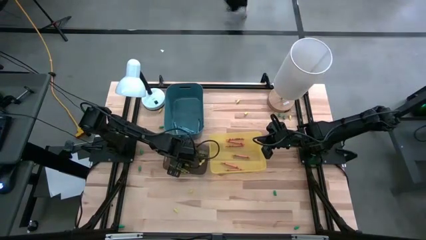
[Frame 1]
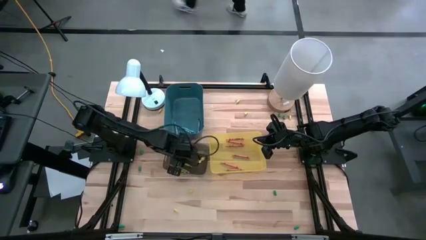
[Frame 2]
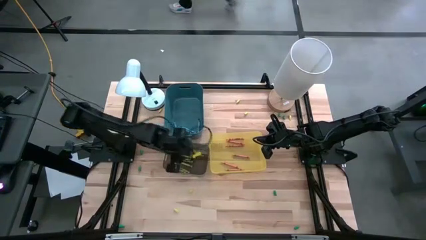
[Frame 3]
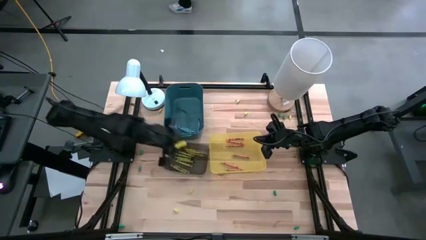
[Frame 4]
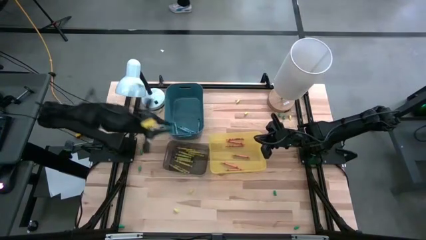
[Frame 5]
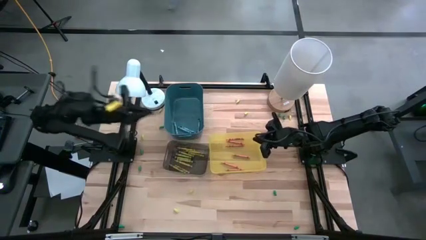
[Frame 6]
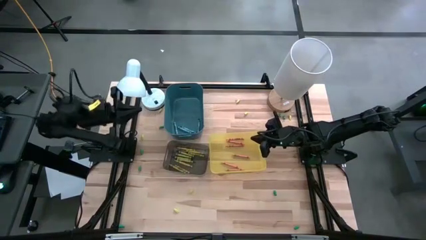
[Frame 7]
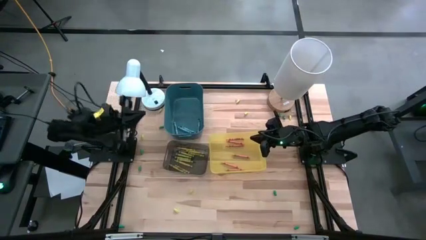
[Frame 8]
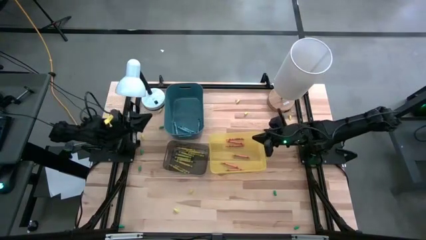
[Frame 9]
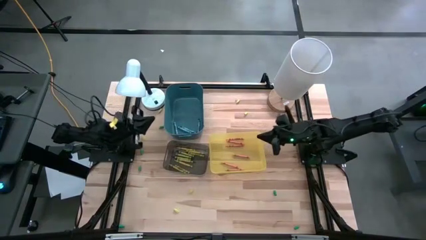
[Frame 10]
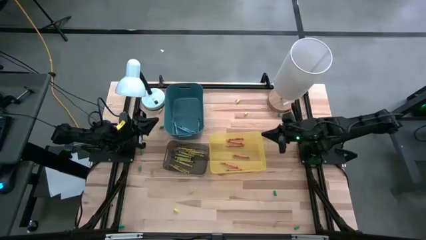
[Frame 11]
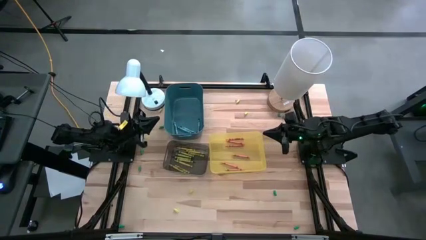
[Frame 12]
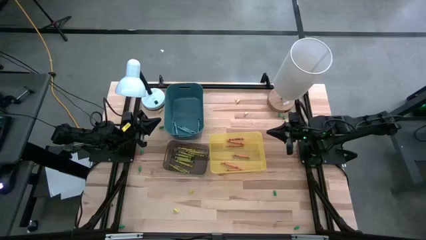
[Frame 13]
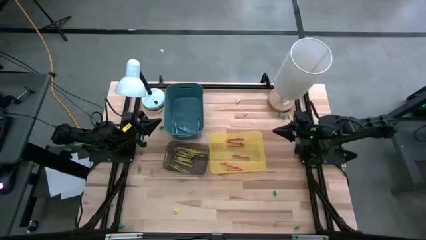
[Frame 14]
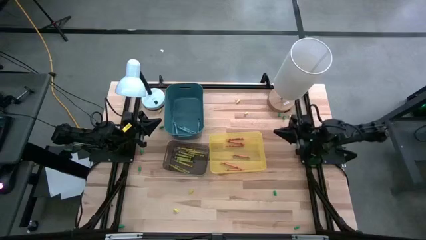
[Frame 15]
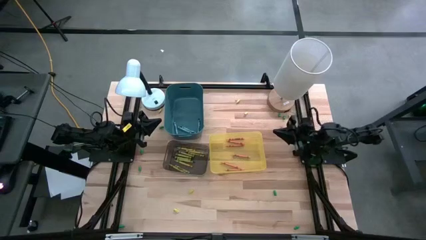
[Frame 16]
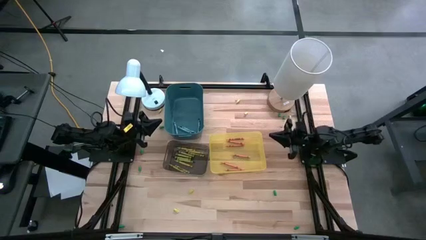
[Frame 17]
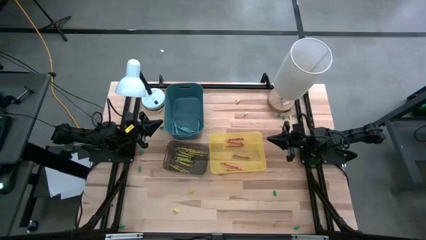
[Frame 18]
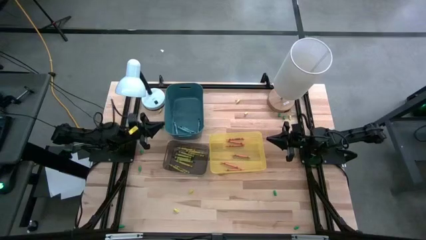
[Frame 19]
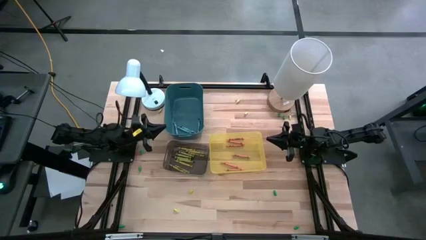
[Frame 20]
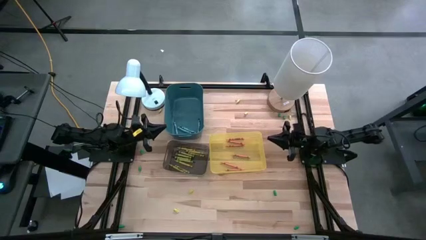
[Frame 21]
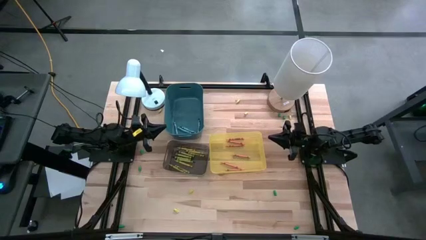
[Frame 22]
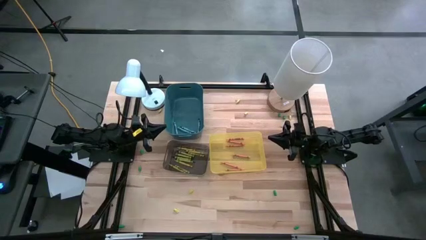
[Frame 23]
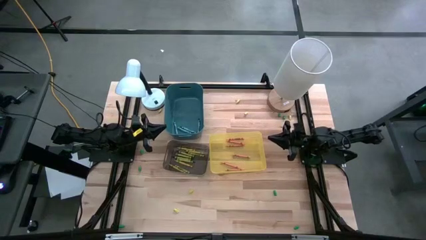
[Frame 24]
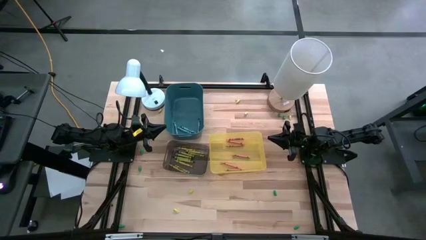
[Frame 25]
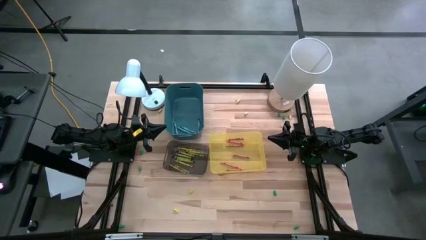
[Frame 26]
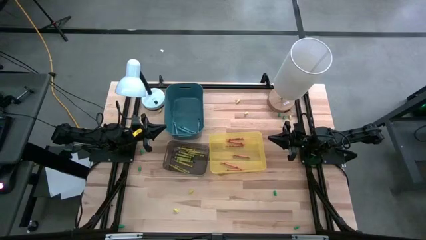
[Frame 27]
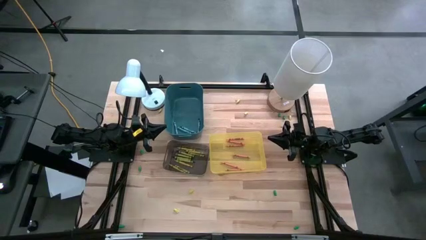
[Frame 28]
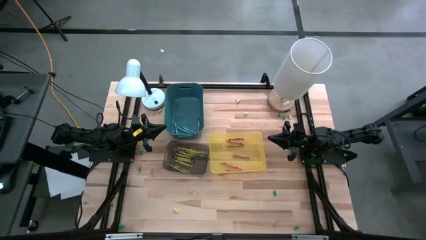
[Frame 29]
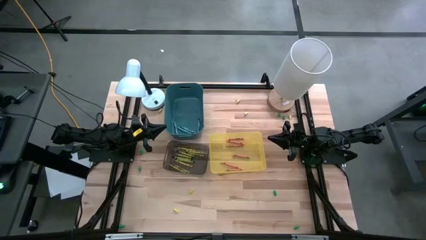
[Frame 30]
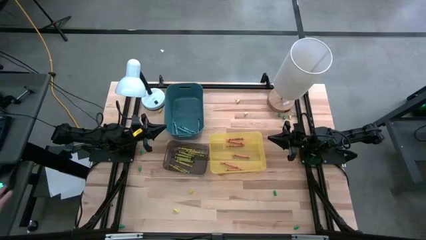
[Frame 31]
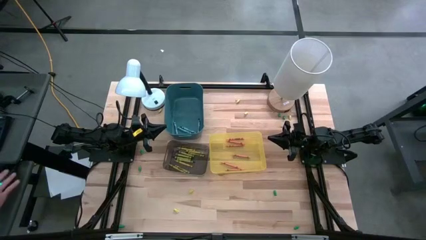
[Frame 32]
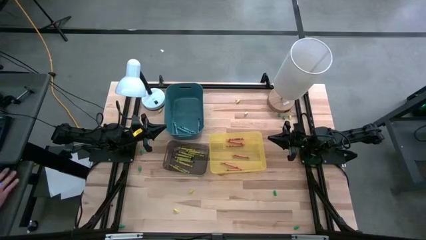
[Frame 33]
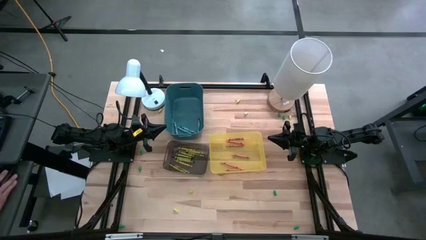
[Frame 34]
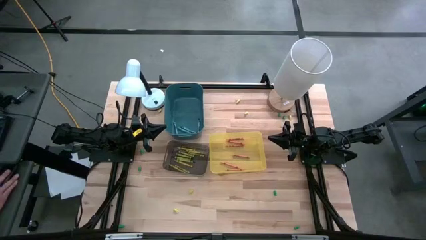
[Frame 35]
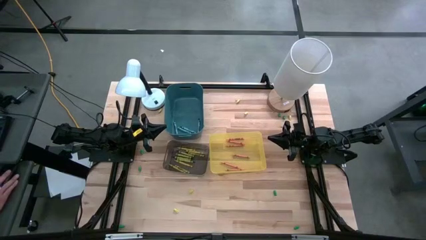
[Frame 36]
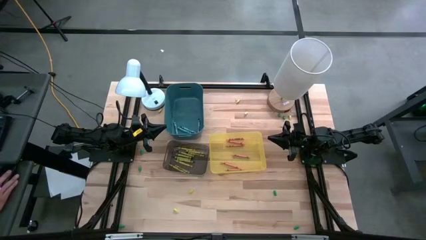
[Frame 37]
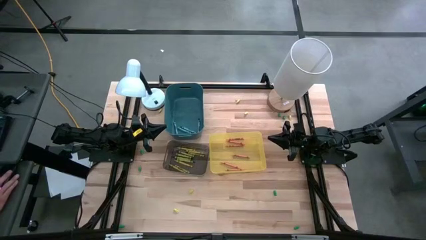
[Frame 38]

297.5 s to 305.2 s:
Task: Sort crayons
Return to Home Position

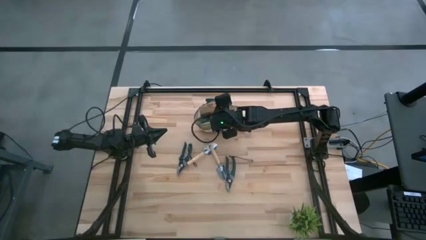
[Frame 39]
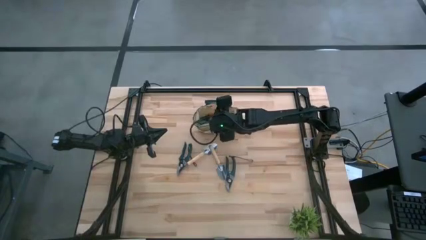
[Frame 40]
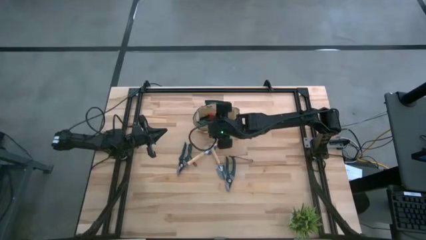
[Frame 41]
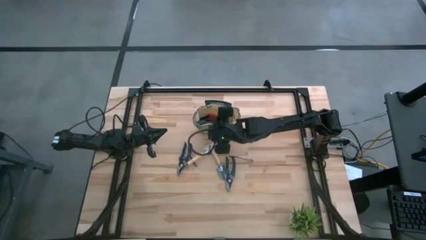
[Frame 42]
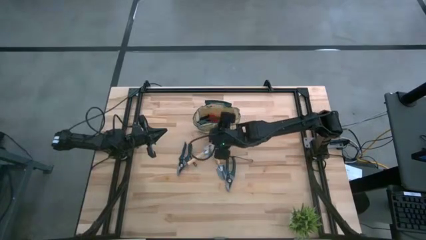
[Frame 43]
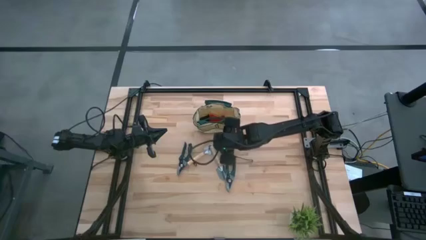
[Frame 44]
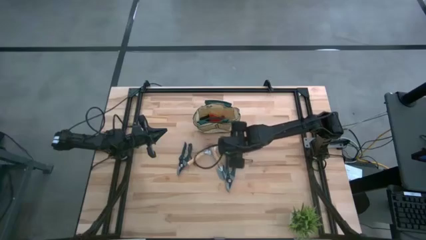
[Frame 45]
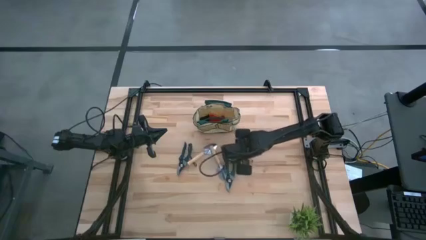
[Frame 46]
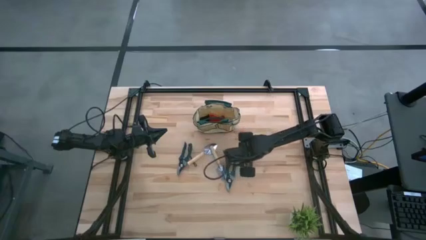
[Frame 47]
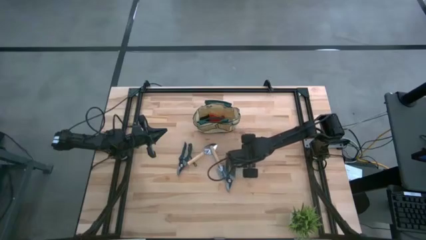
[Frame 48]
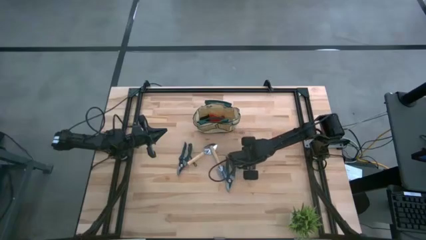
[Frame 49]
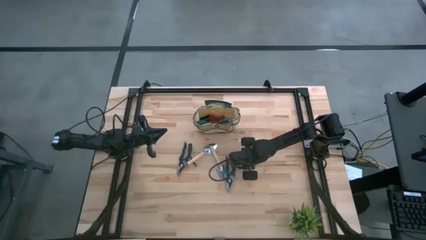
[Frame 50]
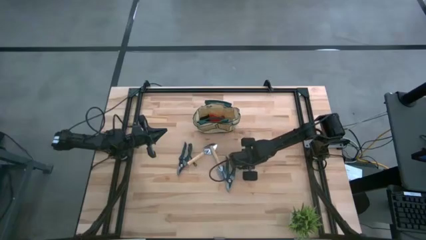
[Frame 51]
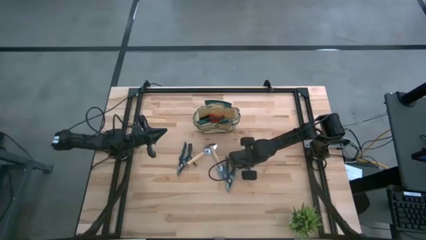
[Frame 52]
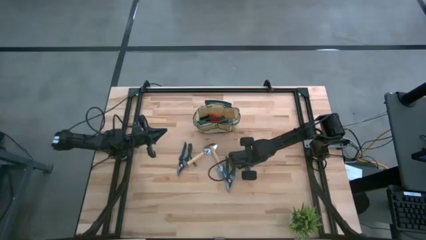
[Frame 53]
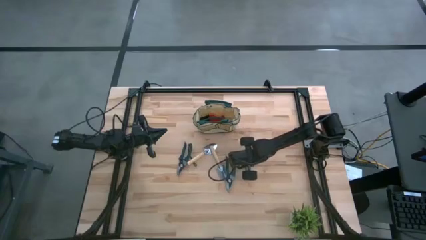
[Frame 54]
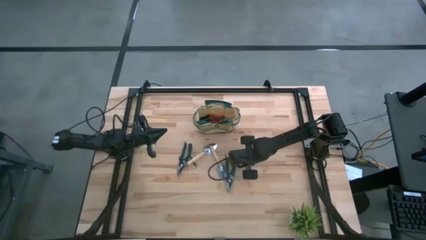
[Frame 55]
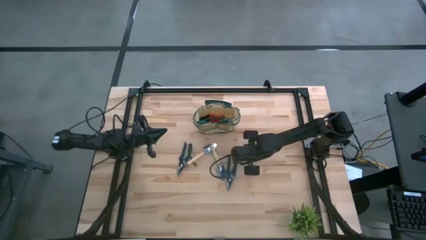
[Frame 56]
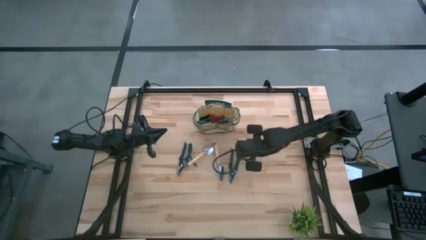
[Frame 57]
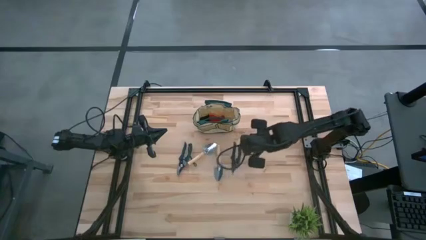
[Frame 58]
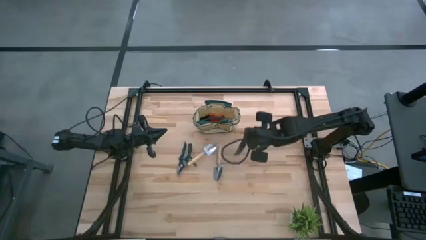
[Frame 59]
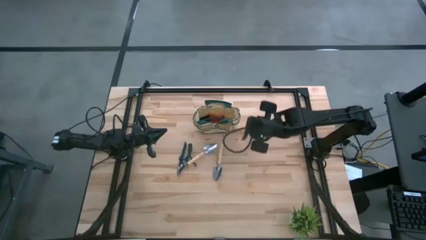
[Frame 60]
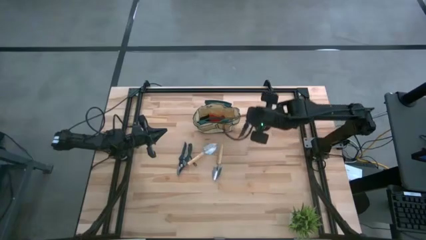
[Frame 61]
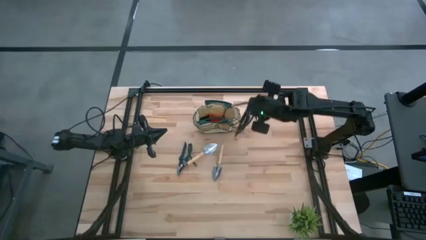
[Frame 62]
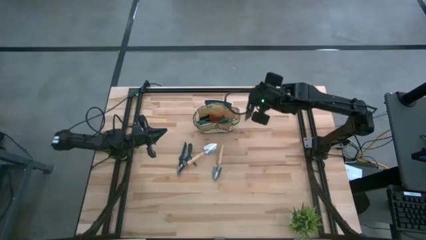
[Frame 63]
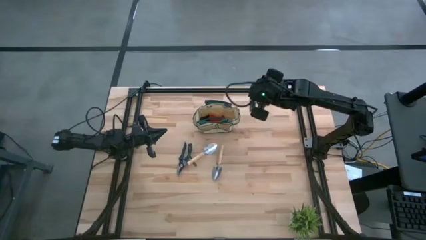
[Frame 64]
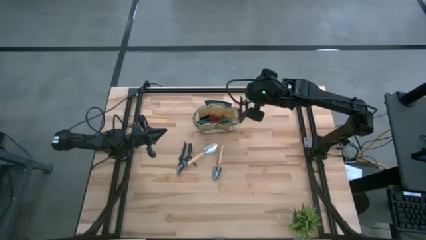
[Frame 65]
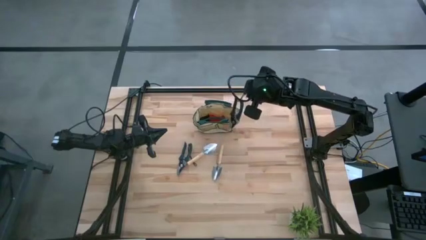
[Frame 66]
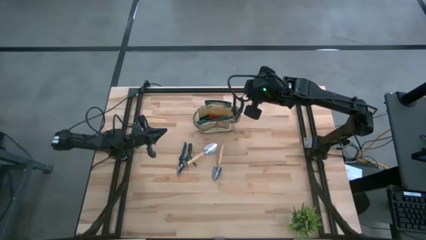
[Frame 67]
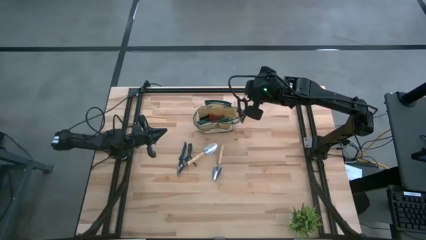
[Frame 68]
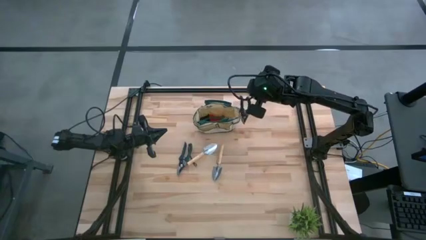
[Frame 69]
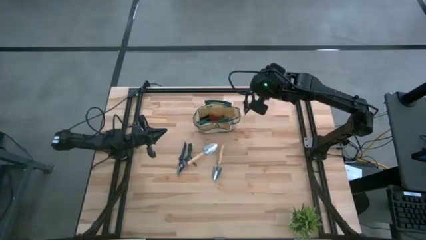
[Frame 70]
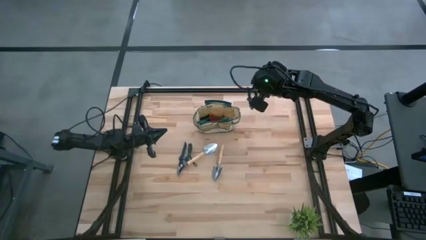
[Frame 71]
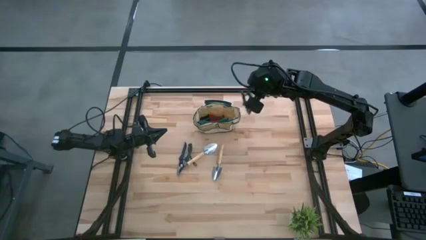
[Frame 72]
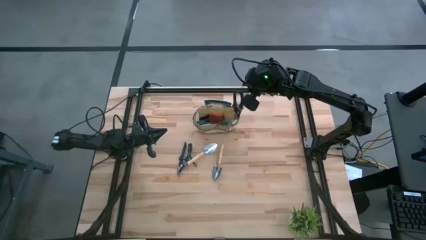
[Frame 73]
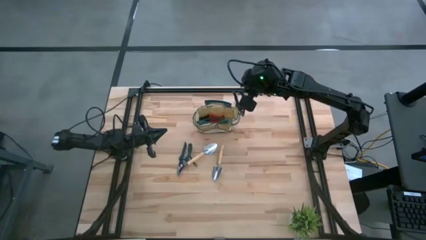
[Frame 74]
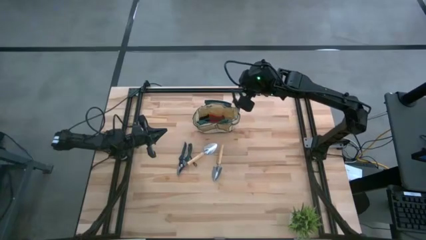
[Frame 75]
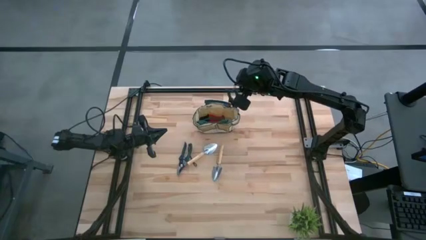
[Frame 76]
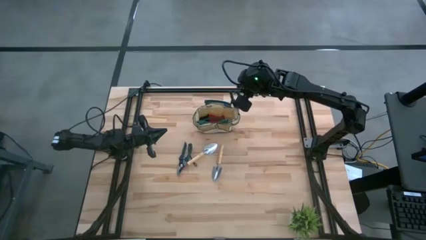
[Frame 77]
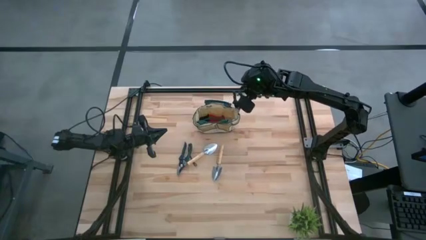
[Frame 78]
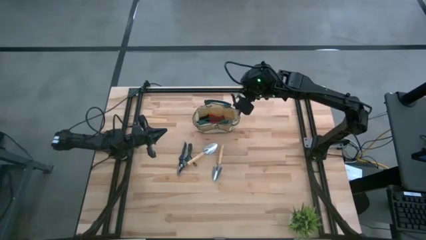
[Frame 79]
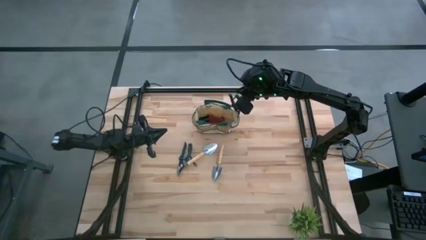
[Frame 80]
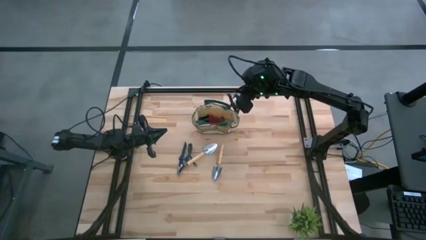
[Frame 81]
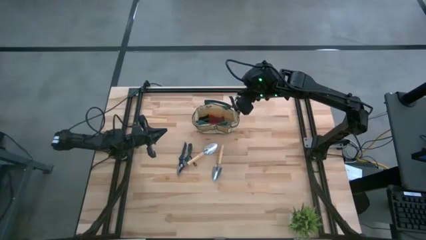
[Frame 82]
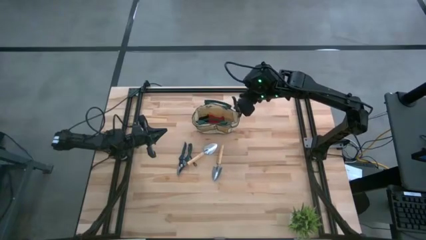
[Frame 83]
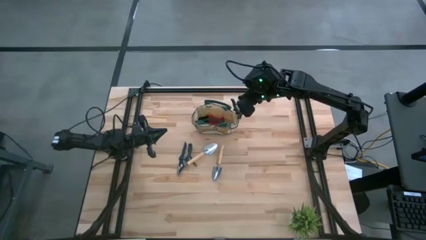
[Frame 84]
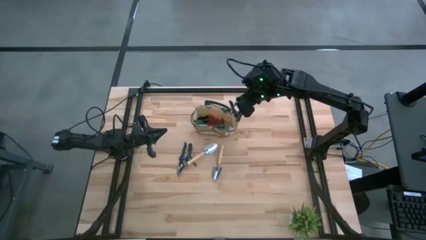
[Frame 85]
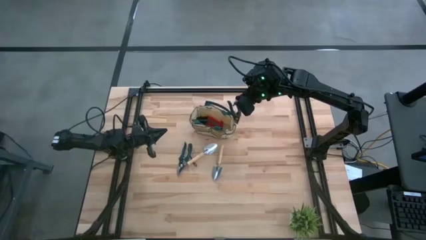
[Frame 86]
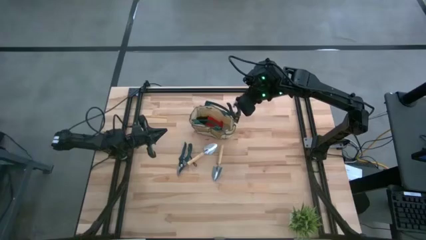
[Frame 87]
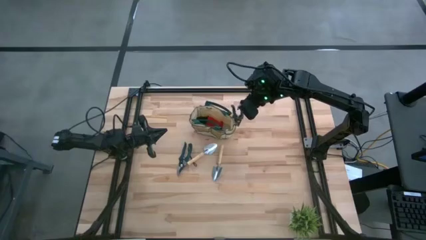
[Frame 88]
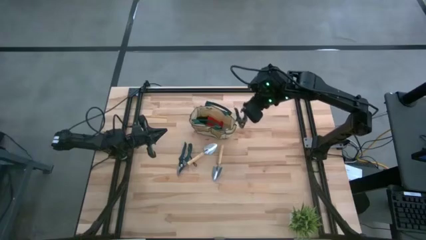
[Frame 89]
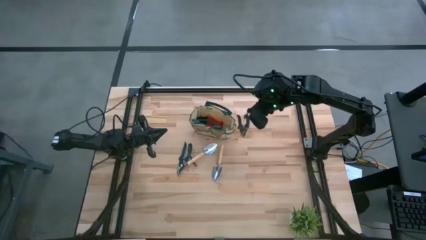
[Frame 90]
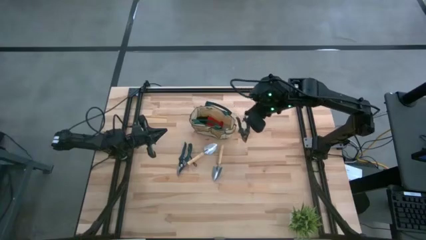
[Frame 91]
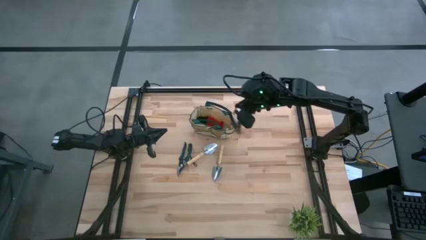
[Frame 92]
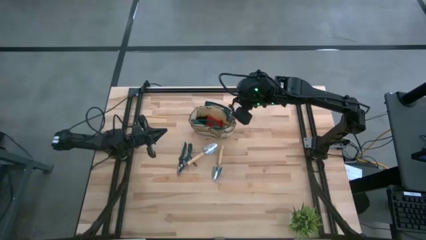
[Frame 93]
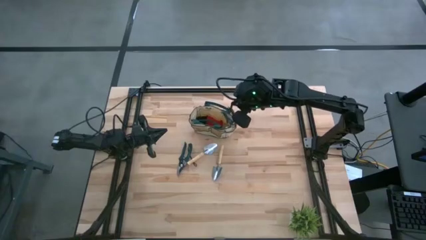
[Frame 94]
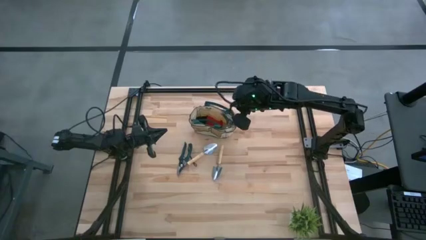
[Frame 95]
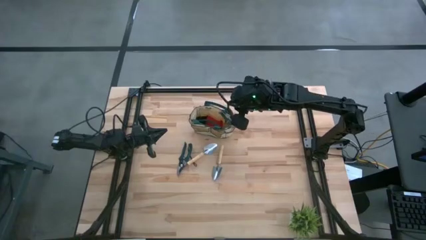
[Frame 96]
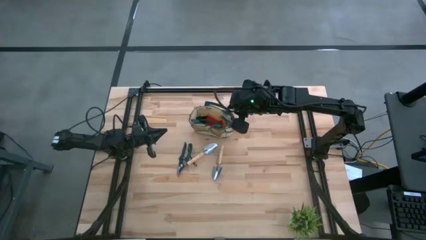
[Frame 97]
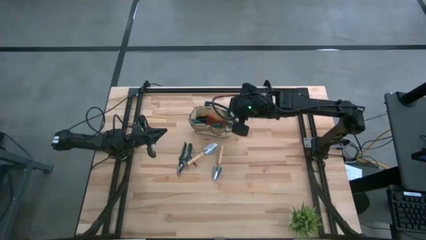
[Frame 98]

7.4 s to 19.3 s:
Task: Pick & Place Garden tools in Gardening bag
Put the right shear scissors into the gardening bag
